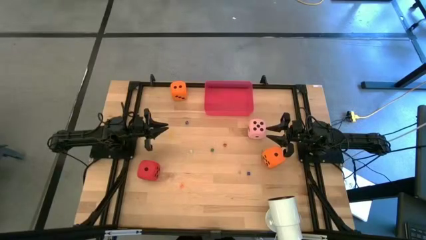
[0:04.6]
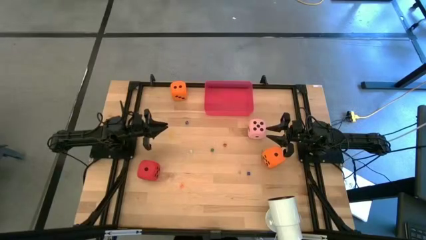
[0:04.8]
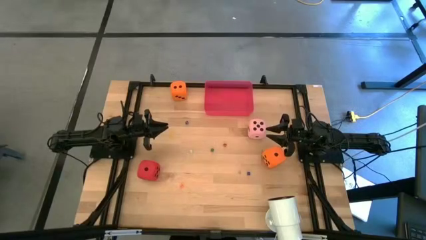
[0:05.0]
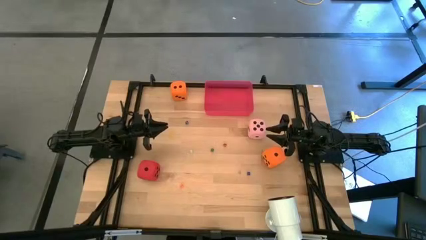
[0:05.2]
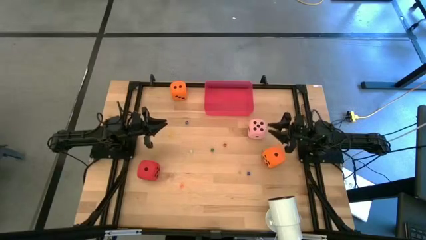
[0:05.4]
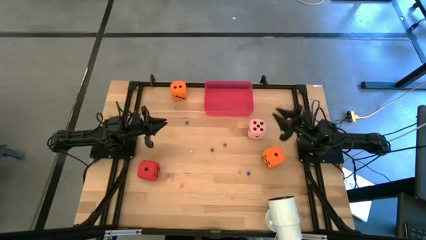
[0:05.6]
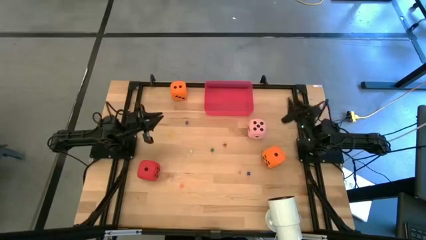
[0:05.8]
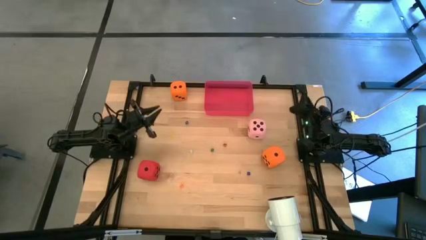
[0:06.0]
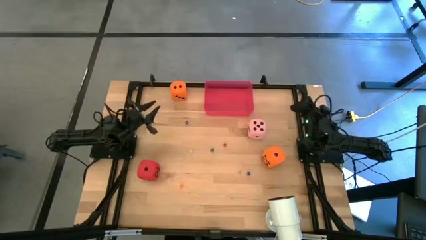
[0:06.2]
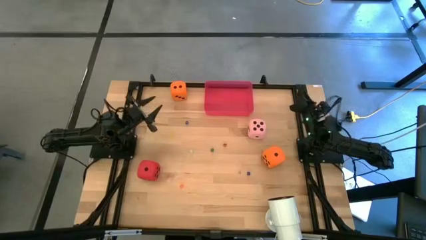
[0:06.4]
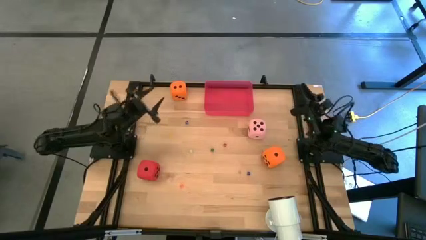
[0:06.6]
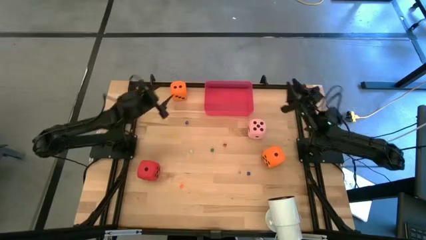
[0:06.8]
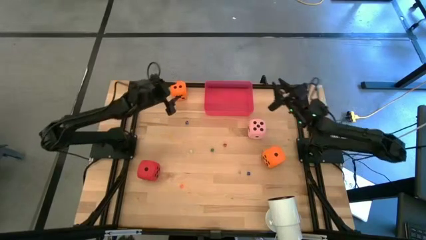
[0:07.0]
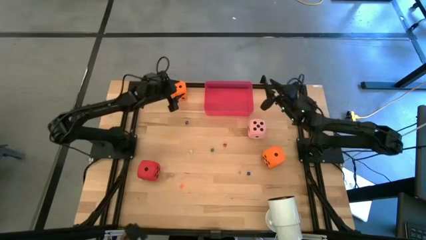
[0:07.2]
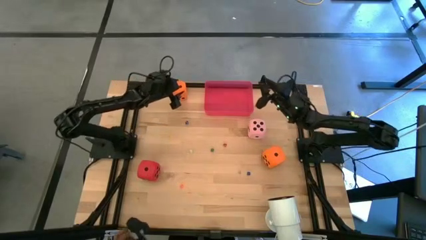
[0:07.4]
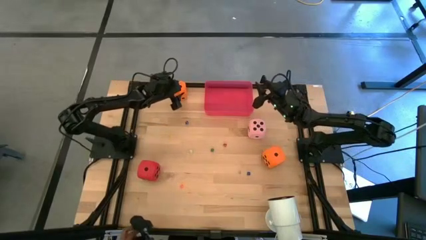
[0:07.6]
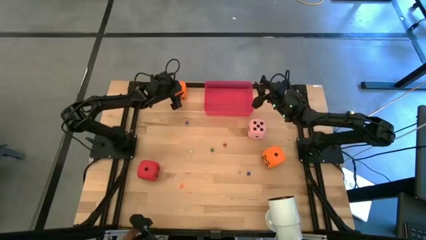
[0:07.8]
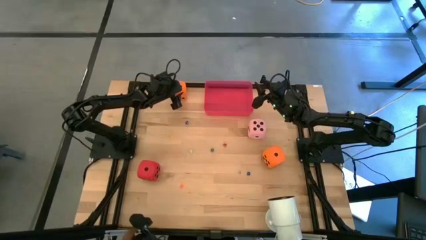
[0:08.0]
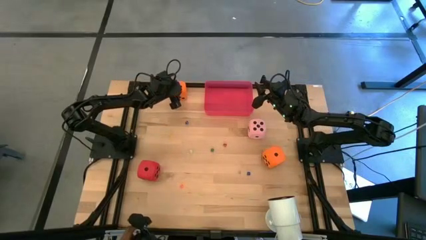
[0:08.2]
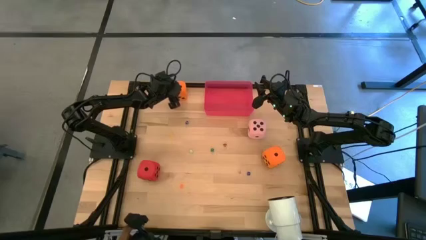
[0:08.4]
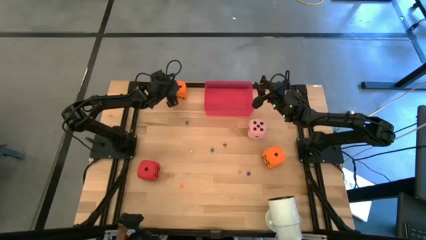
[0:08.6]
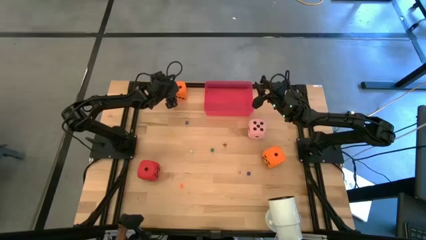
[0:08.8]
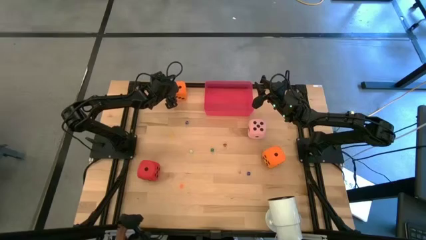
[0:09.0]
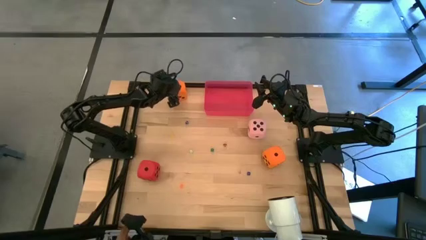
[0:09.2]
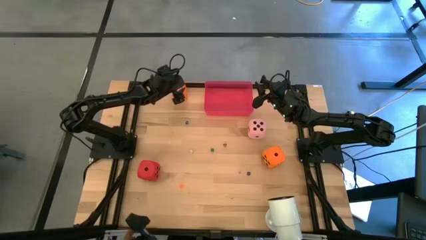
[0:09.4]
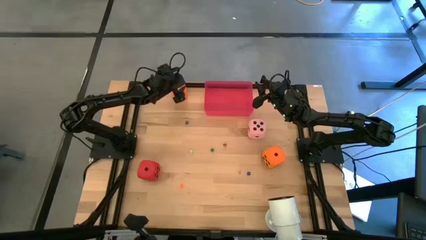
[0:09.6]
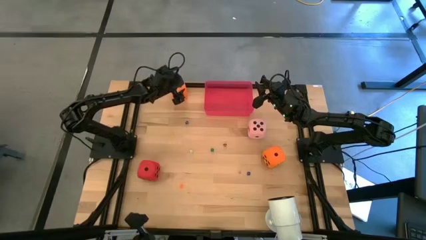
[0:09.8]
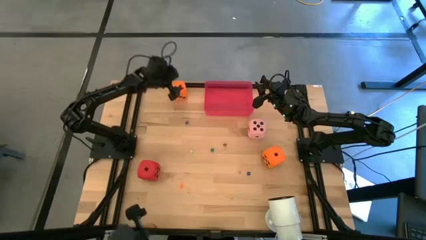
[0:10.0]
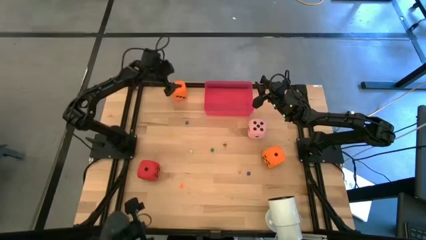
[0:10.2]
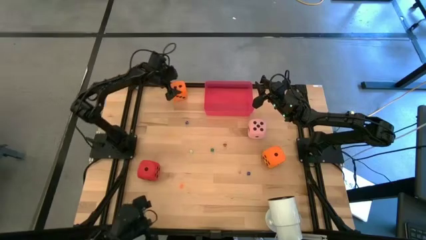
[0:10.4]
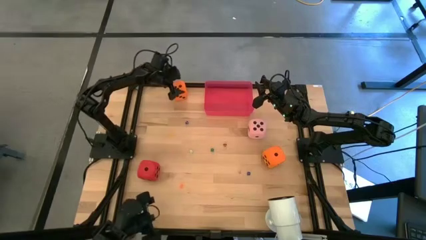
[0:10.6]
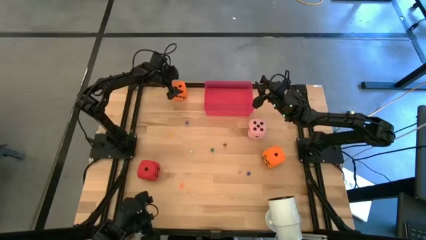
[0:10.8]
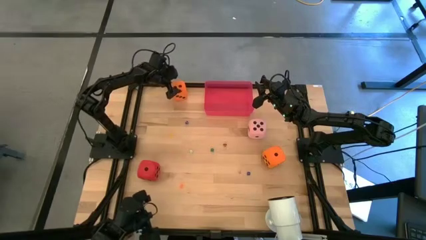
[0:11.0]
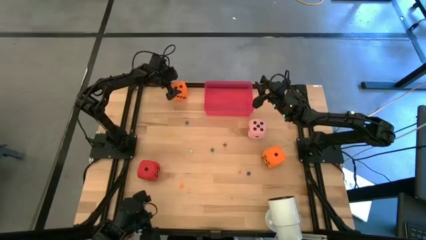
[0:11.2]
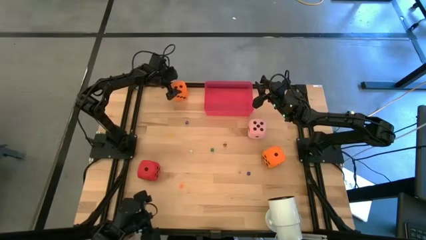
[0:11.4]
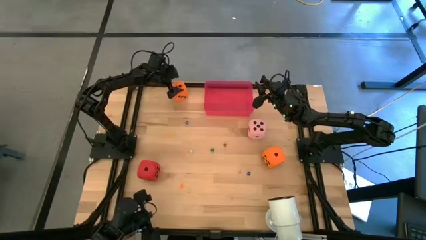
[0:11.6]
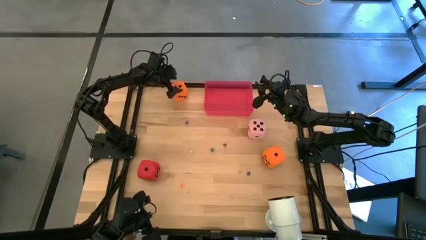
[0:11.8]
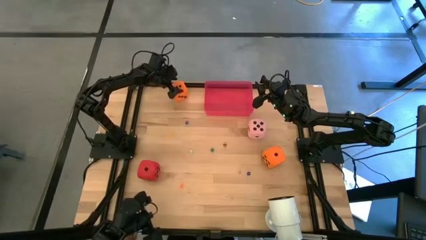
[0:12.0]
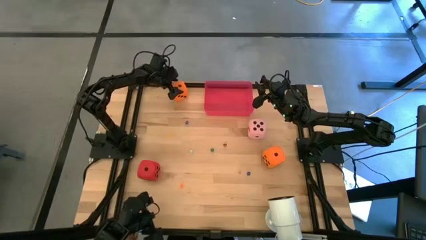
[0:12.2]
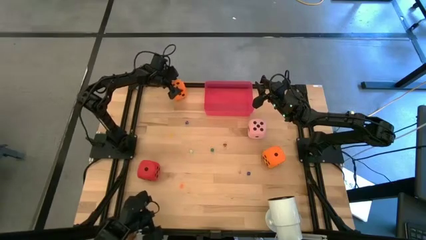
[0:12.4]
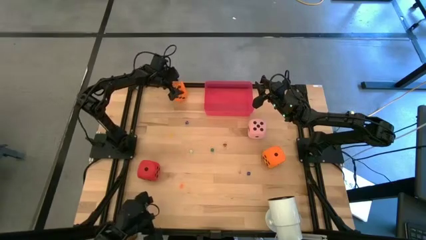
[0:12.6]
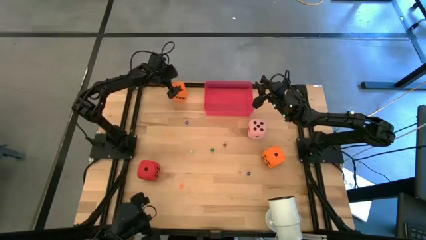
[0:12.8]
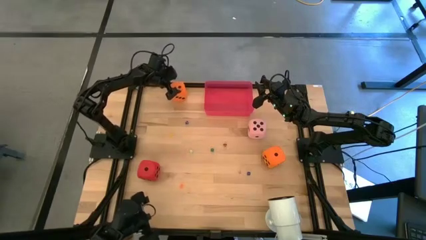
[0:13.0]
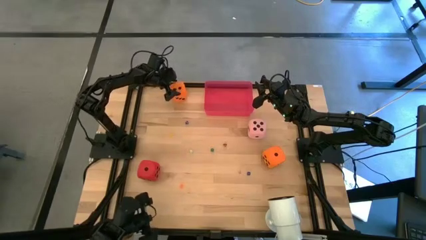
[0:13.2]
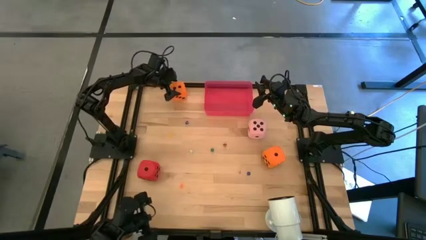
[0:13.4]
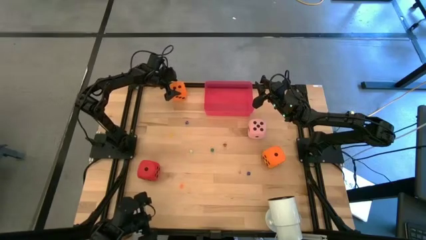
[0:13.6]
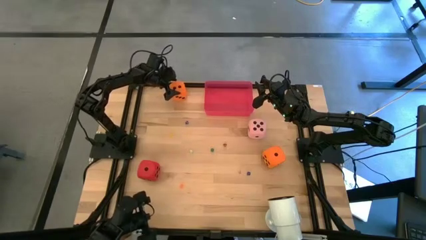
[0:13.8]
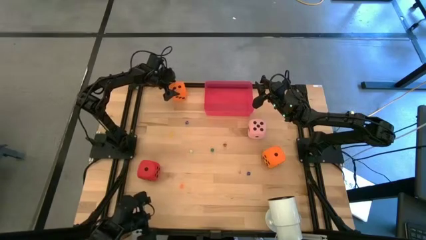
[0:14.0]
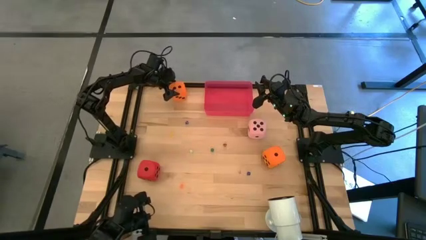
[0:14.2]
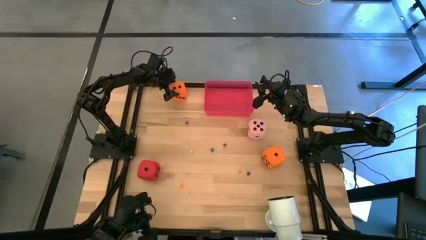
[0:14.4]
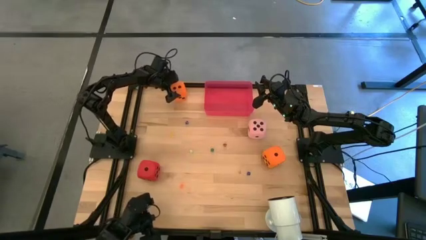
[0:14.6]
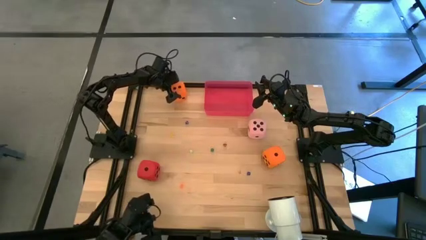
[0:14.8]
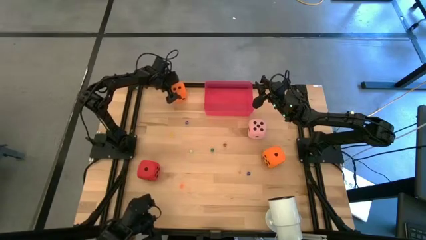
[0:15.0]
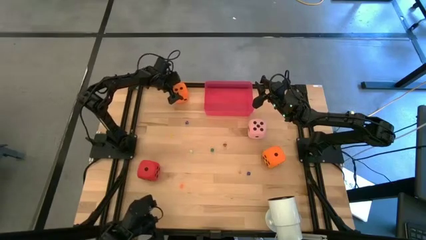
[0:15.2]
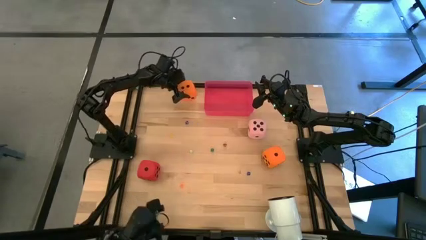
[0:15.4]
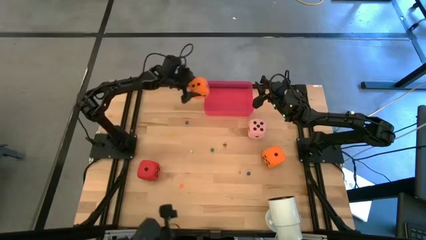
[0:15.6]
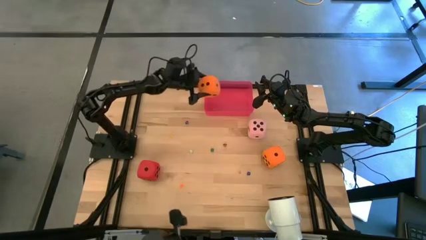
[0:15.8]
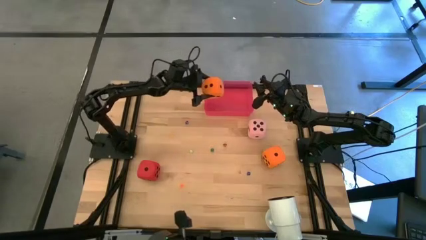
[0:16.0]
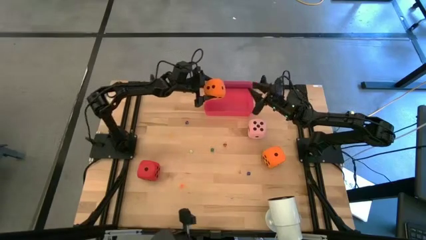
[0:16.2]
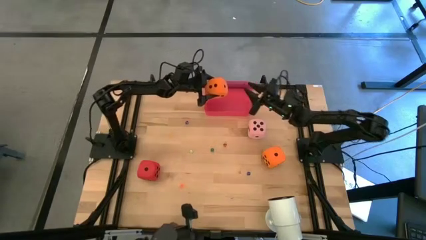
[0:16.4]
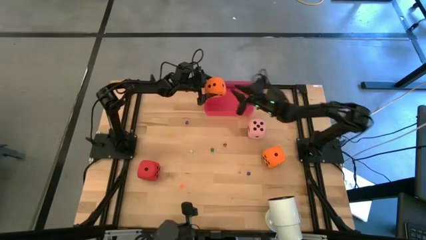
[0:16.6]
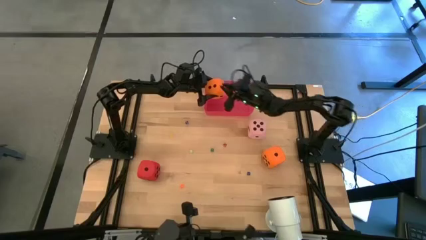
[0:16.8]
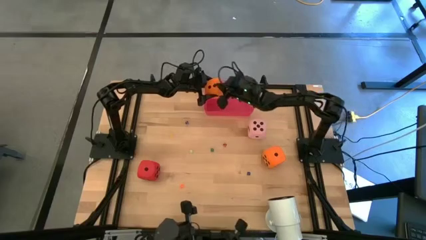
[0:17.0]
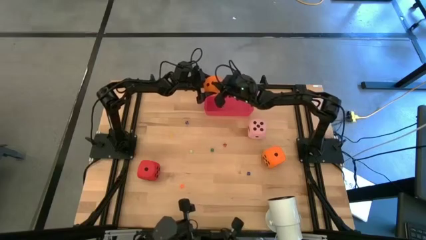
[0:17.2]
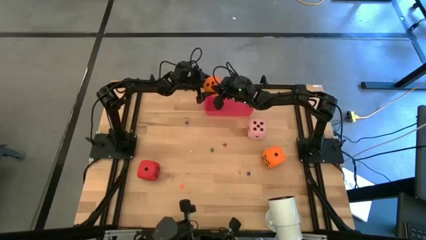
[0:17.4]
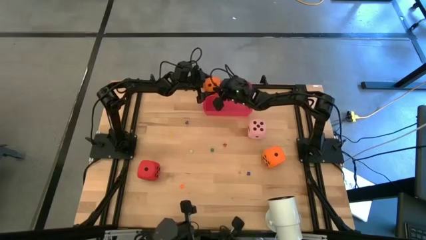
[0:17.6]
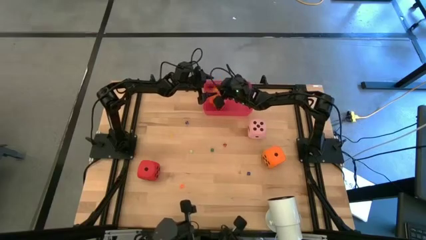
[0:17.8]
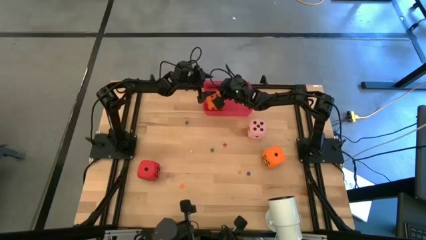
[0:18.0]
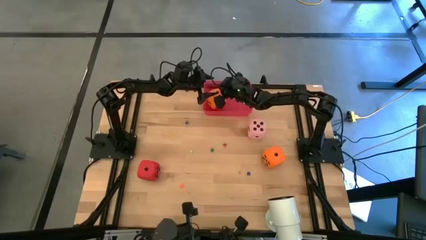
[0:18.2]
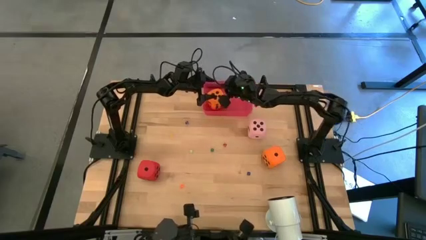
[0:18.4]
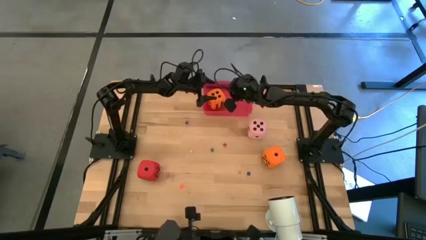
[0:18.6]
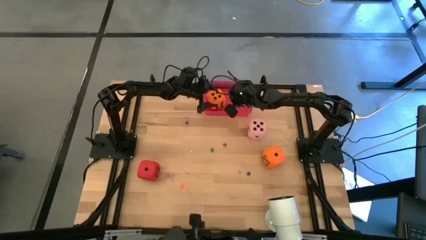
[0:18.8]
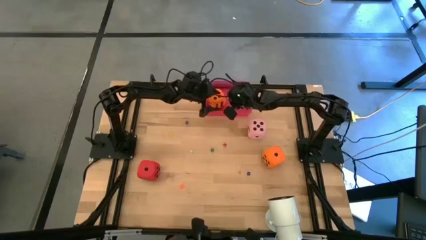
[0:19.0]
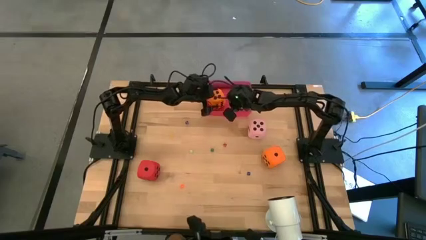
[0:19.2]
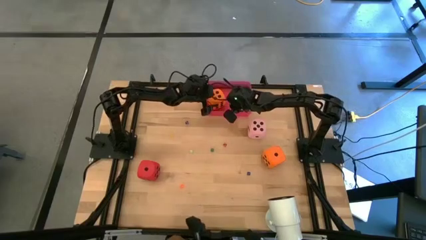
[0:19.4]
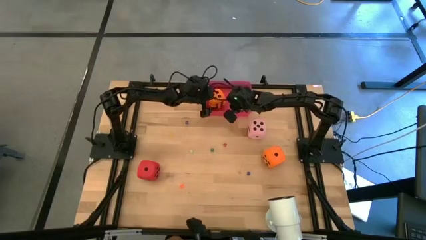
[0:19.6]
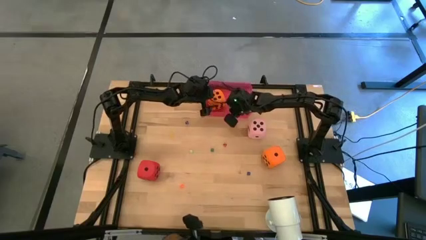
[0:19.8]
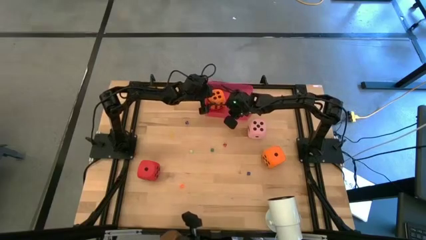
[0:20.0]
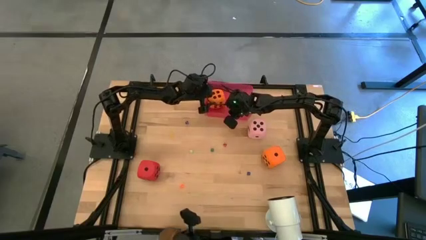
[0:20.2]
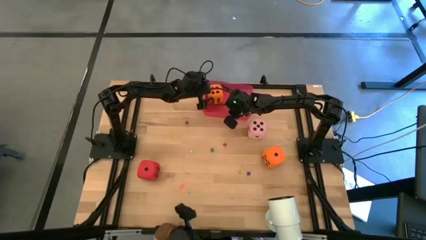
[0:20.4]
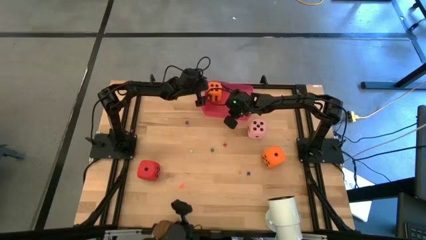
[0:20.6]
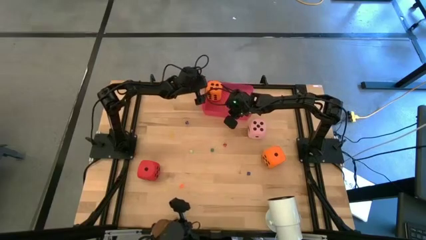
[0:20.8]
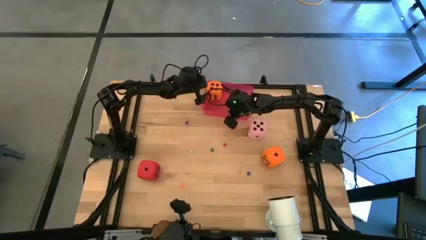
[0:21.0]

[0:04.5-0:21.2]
Task: Pick & Place Dice
Put the top large orange die into the red bin
